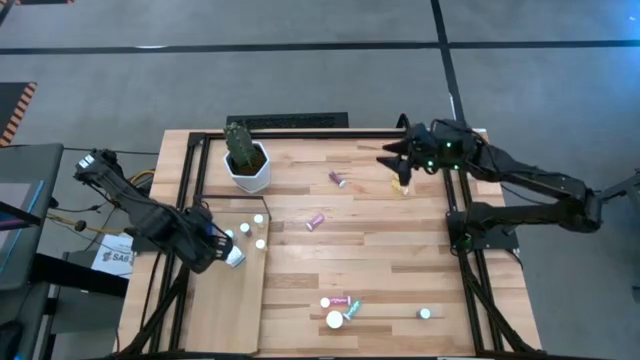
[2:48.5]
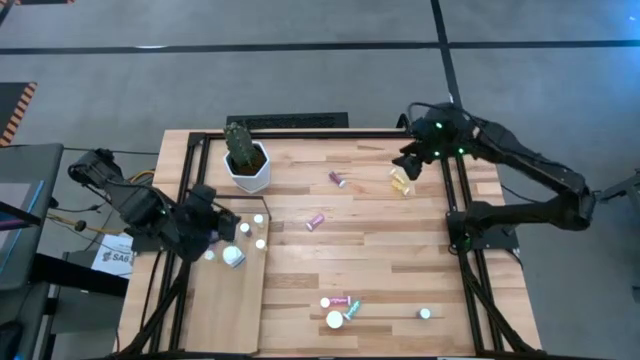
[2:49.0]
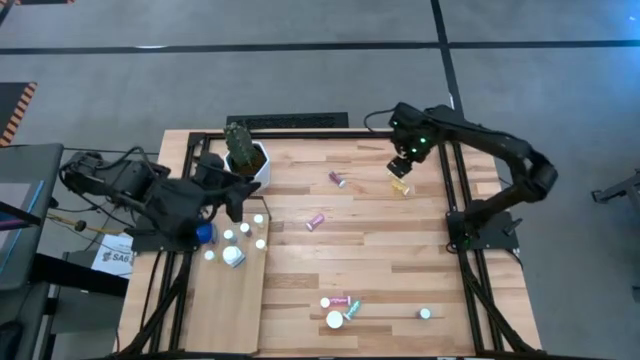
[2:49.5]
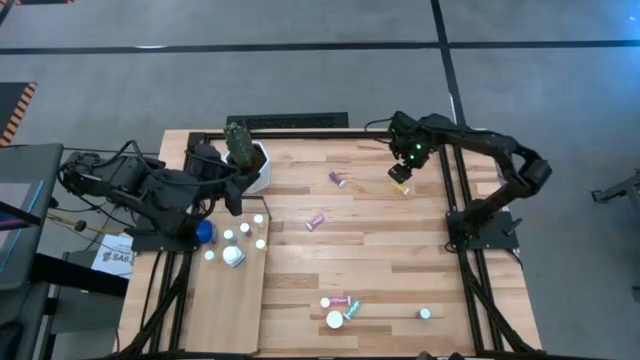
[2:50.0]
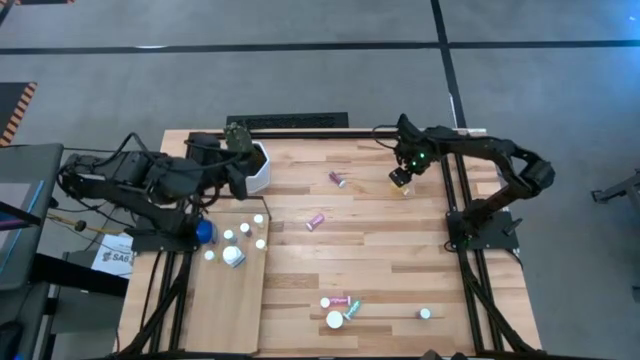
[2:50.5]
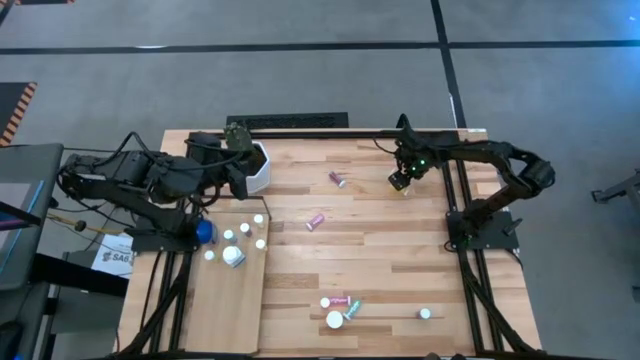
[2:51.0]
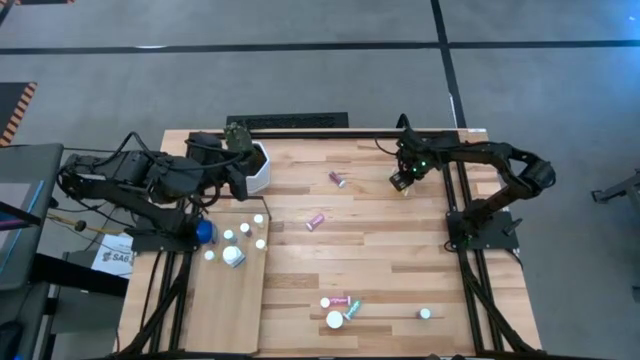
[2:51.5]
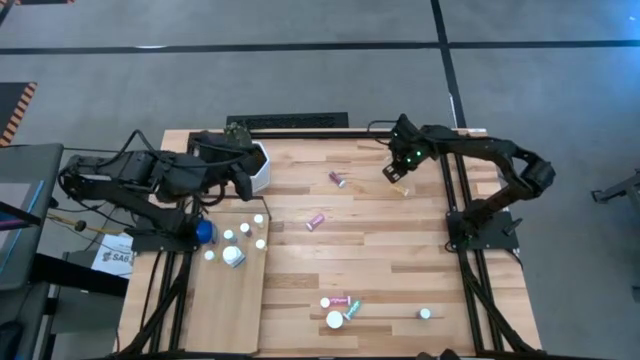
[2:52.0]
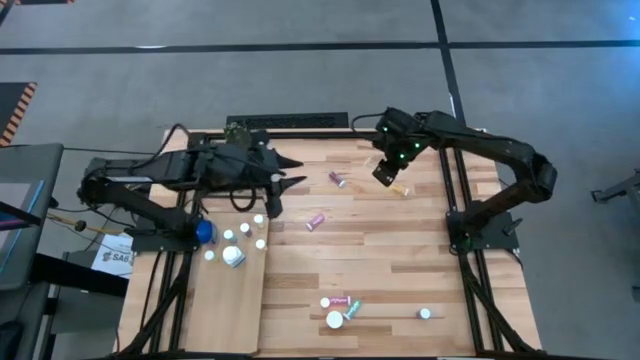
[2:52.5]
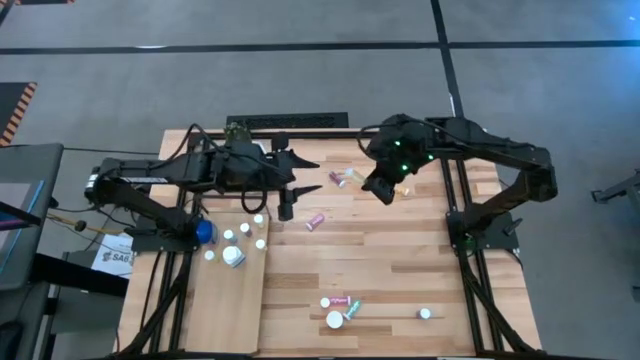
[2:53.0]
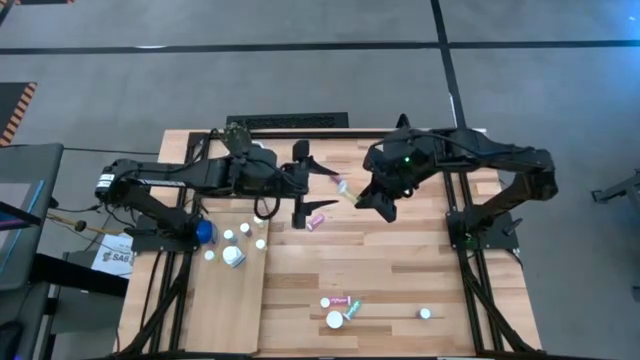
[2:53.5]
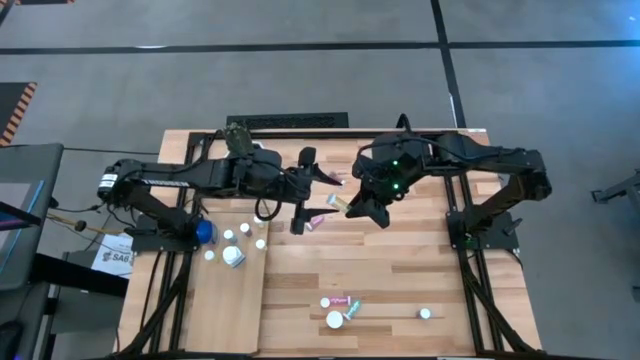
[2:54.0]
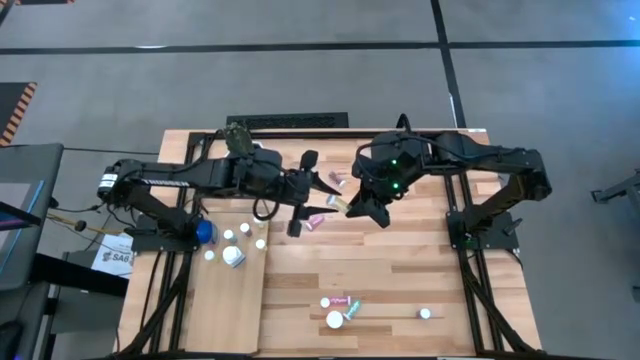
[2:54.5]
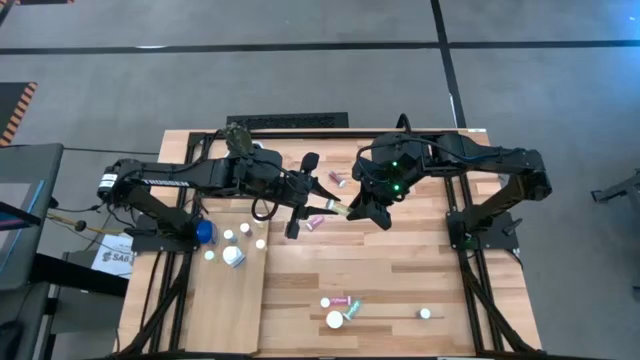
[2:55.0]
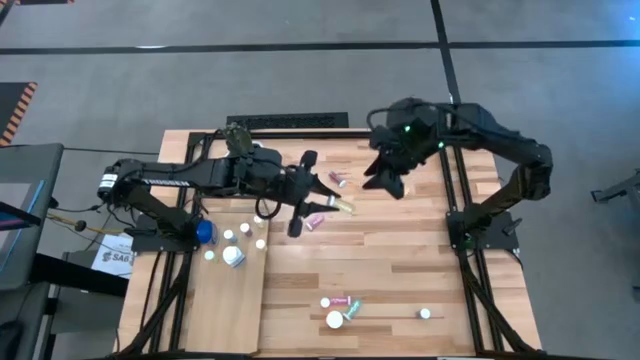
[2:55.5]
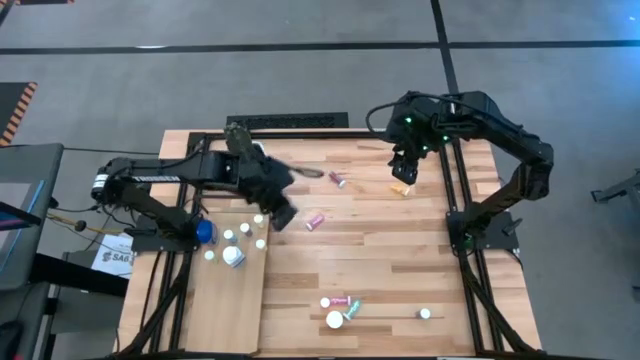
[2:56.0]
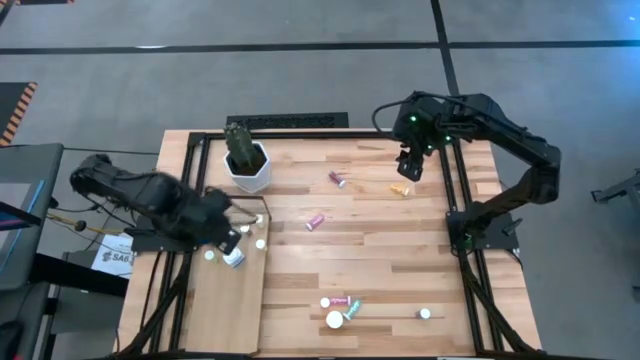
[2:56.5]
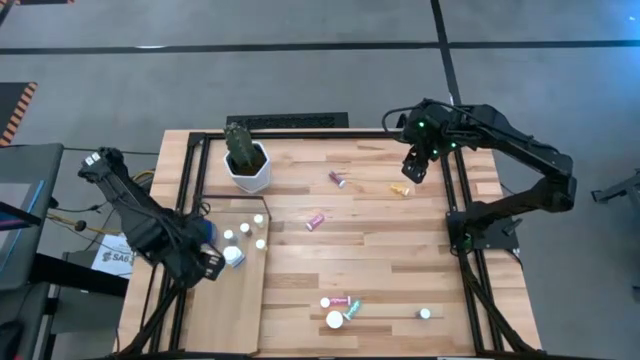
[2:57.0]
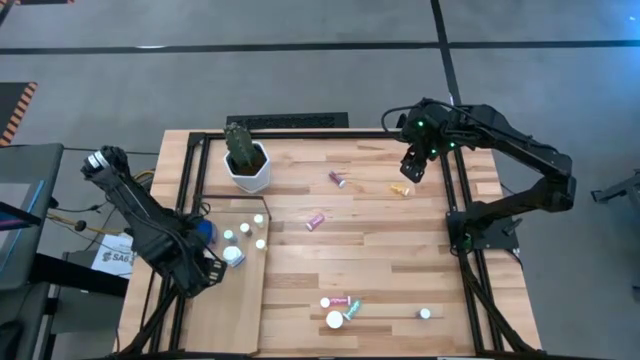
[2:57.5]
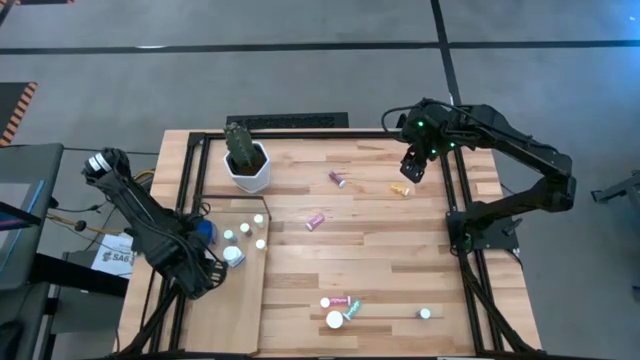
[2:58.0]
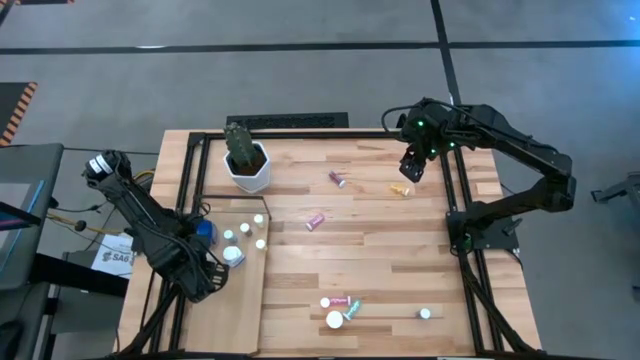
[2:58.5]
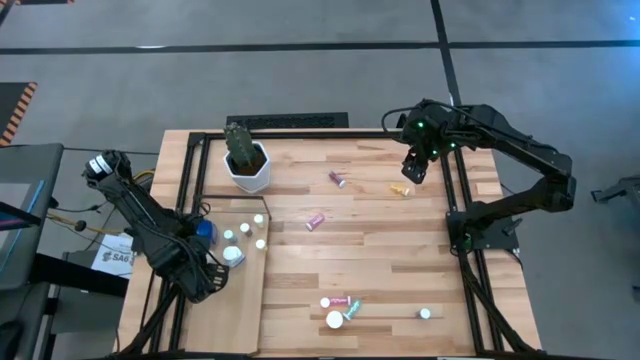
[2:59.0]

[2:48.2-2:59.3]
Task: Pick and place medicine bottles onto shelf by color
Put the yellow pill bottle on the shelf

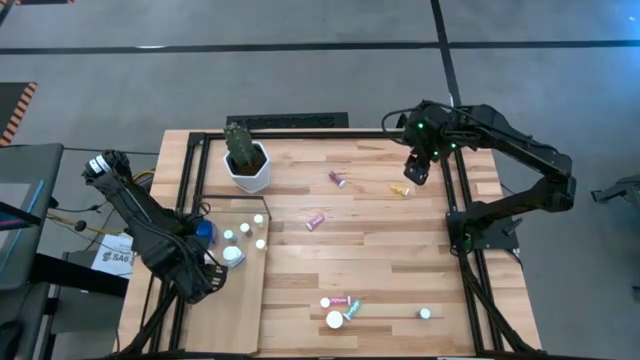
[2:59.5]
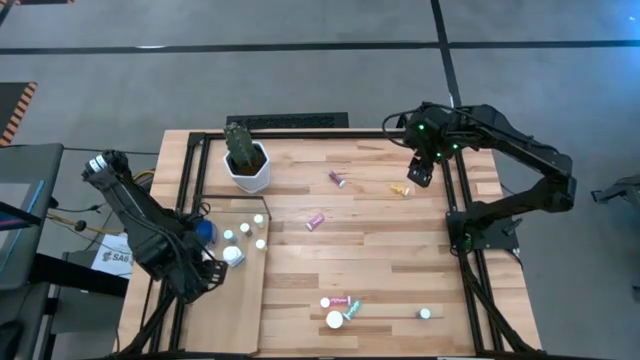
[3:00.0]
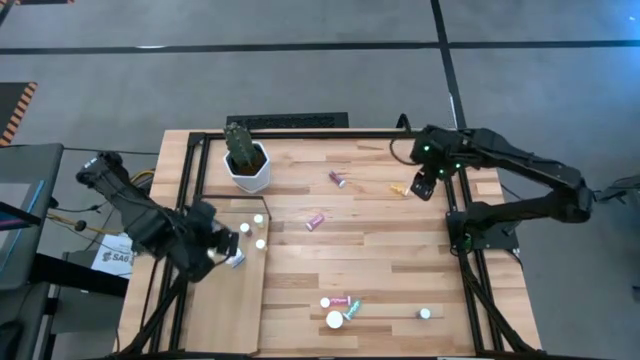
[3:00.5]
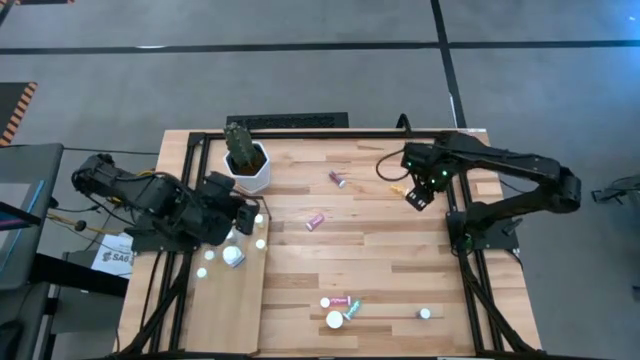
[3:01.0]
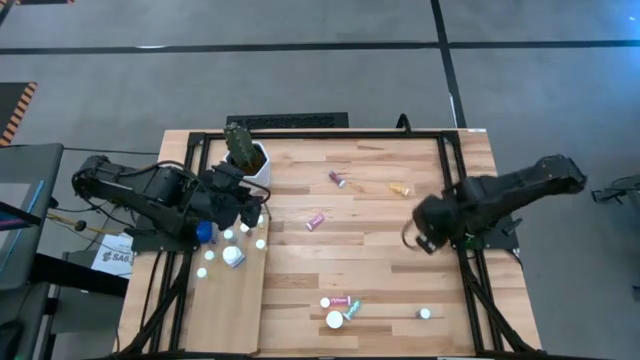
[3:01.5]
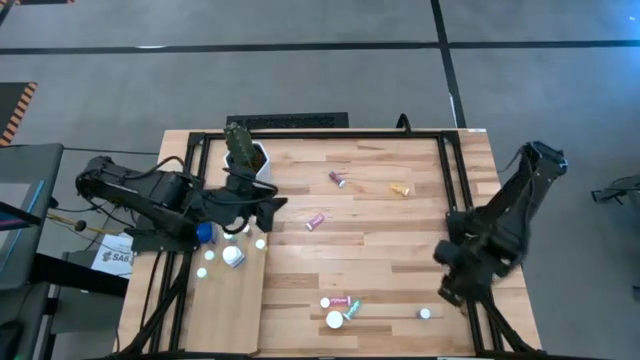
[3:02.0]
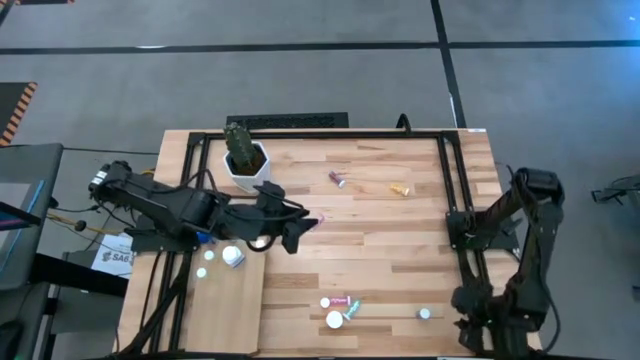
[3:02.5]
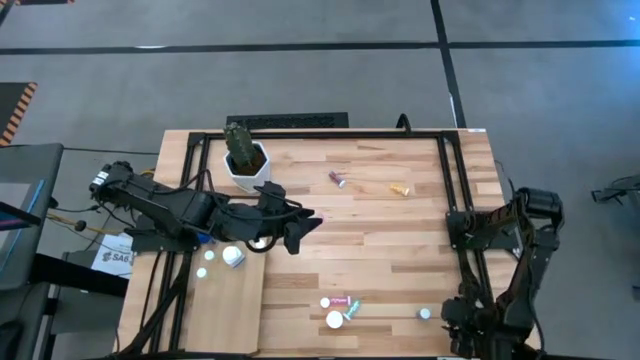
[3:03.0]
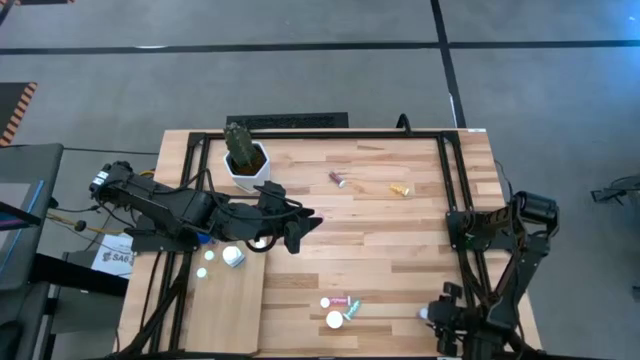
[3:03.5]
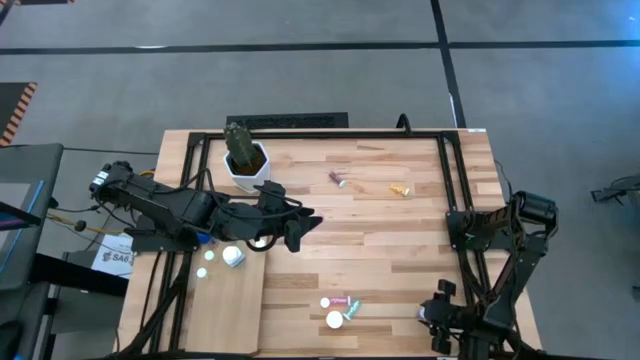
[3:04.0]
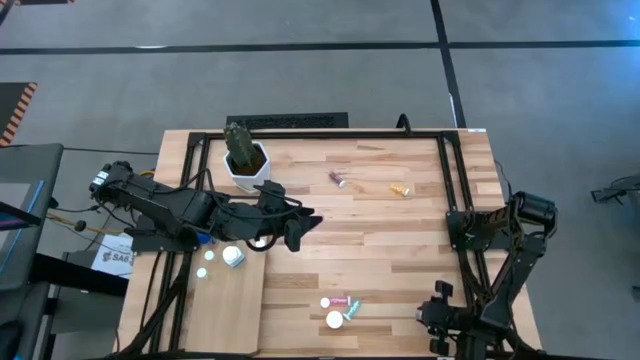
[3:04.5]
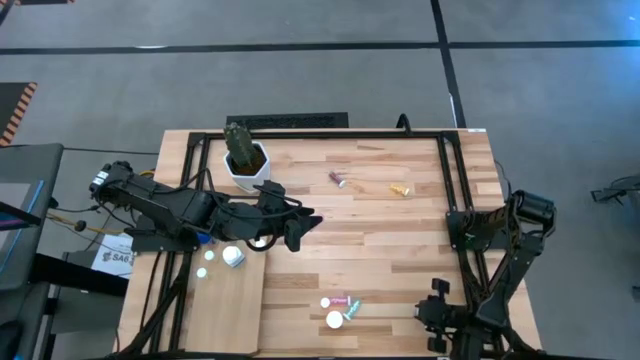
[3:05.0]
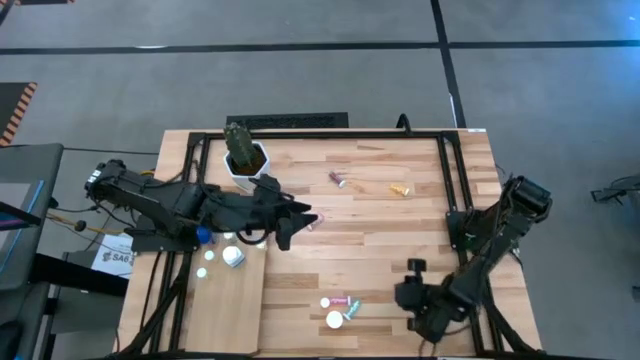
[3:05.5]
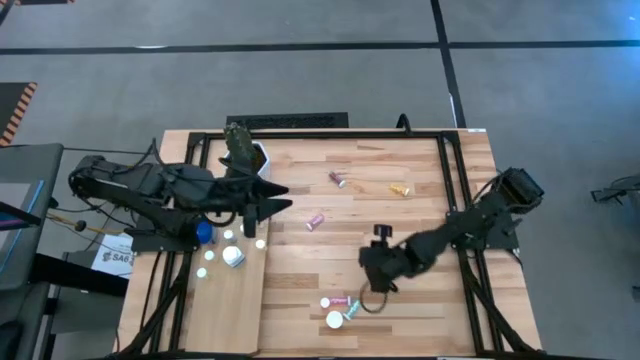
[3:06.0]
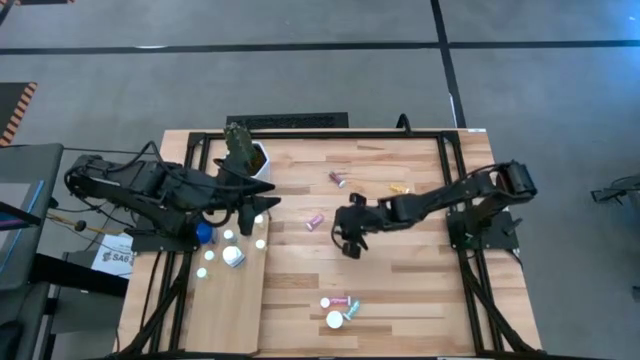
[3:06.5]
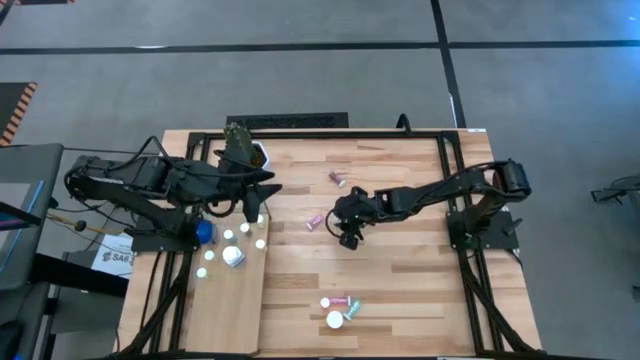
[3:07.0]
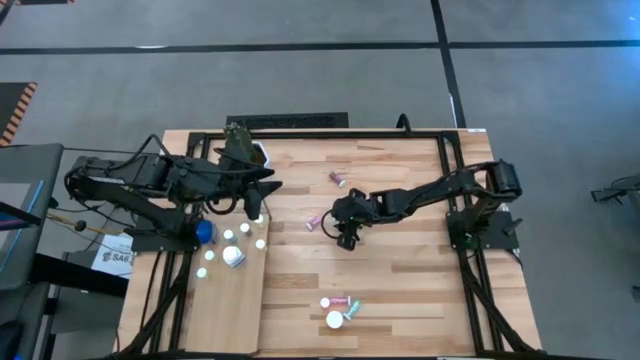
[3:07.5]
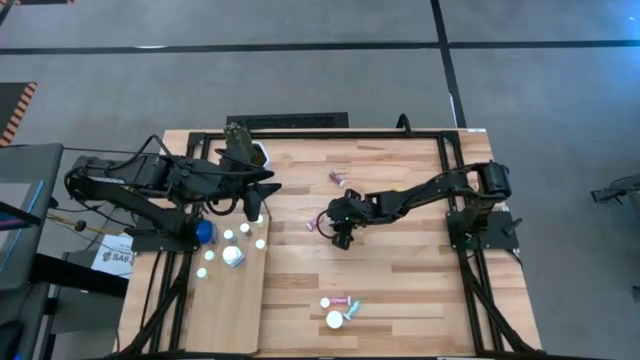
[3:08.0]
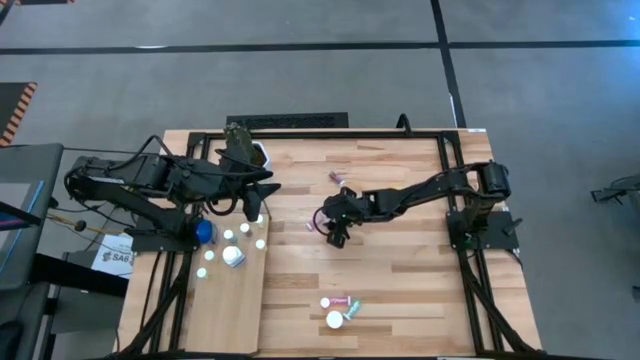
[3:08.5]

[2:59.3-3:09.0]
Move the light blue pill bottle to the middle of the table
